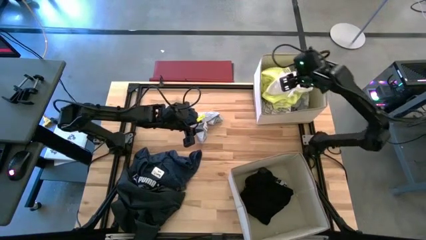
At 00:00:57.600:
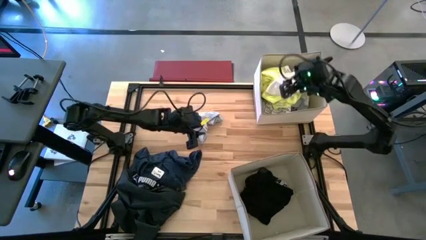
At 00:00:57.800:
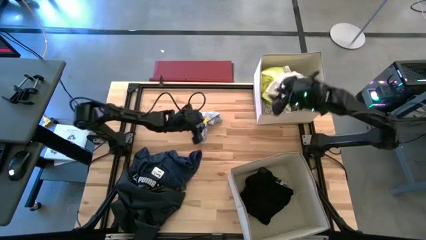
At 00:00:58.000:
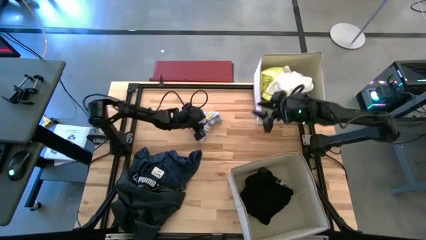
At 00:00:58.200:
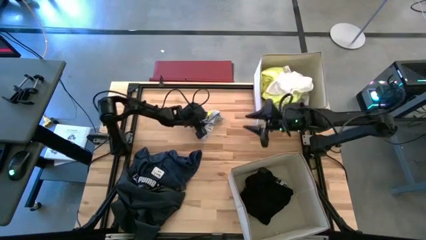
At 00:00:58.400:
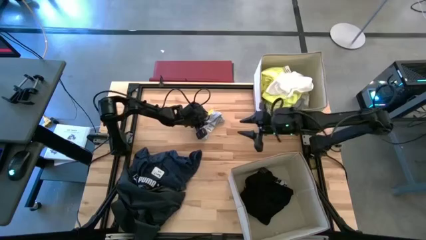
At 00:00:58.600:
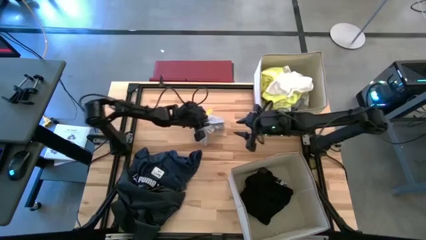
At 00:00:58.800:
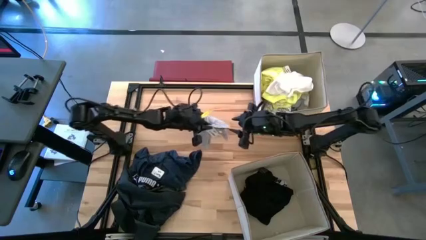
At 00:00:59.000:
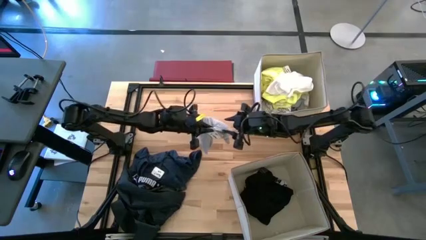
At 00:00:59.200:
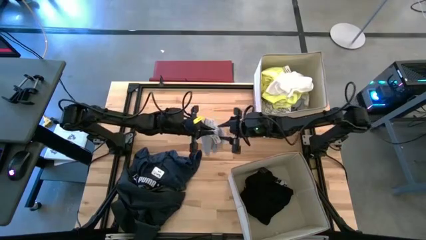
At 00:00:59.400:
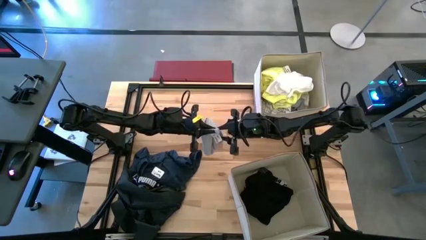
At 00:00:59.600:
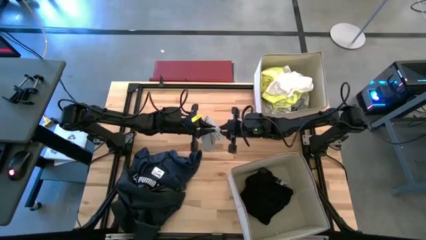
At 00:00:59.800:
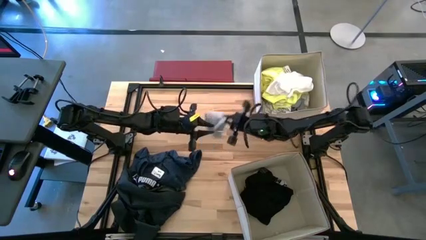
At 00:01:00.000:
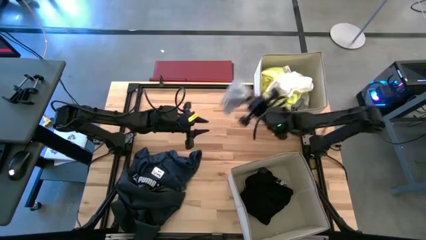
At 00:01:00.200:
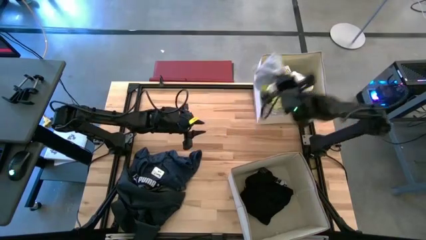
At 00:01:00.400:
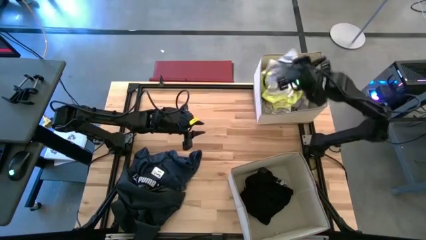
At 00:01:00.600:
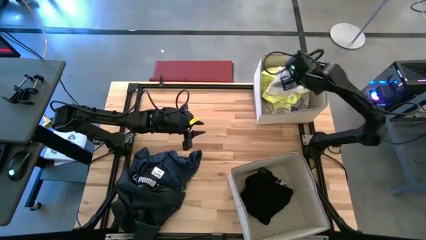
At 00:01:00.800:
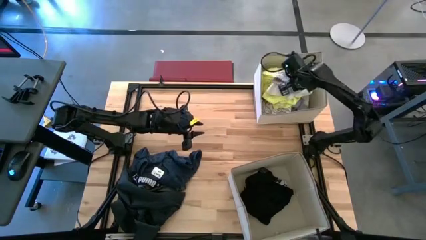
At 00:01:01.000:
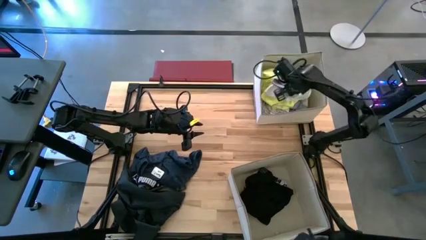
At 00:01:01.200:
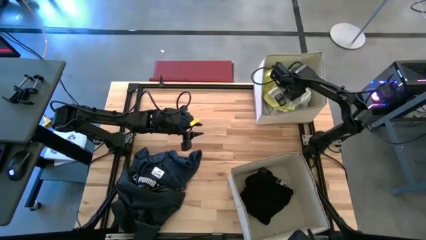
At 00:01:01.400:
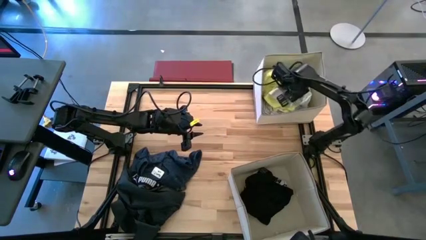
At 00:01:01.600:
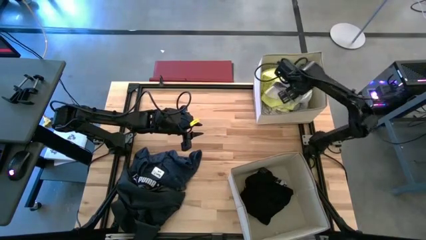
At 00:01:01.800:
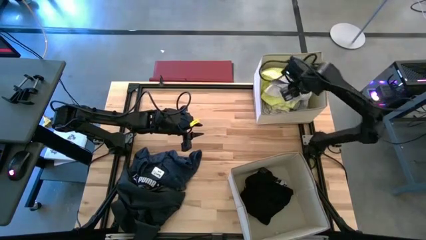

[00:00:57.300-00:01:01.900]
Task: Sort clothes
Put the gray shorts in the top white bin

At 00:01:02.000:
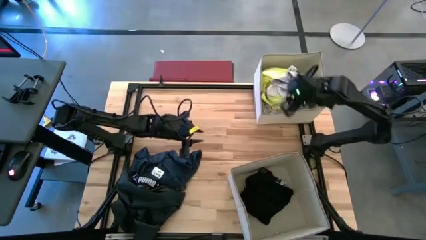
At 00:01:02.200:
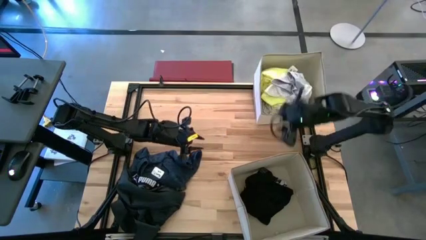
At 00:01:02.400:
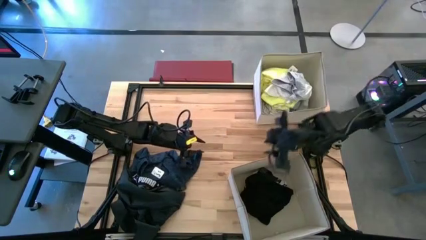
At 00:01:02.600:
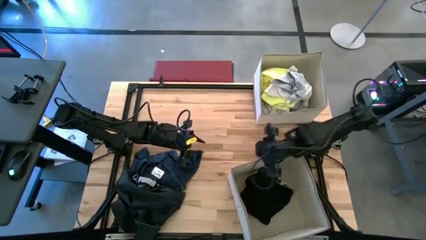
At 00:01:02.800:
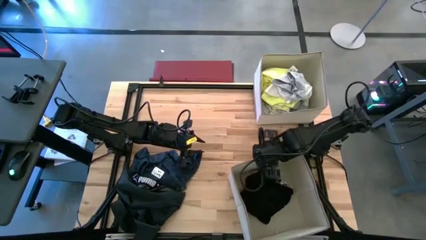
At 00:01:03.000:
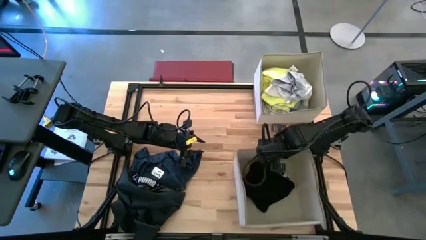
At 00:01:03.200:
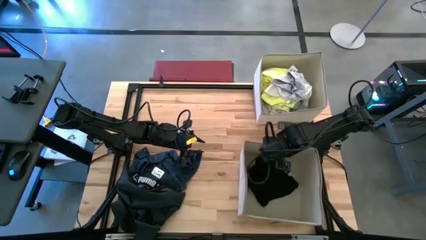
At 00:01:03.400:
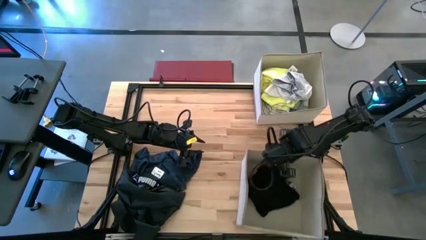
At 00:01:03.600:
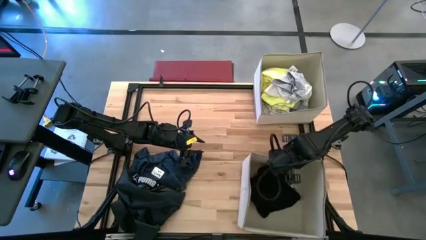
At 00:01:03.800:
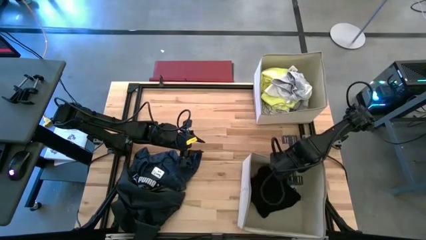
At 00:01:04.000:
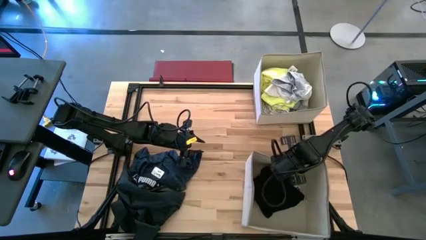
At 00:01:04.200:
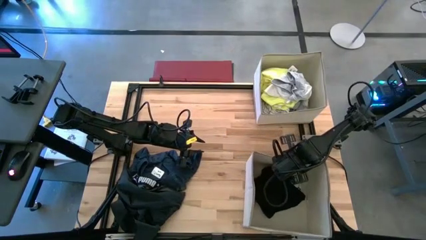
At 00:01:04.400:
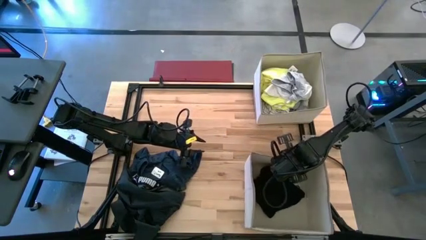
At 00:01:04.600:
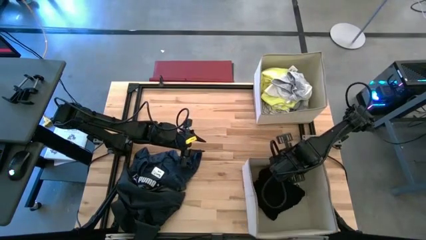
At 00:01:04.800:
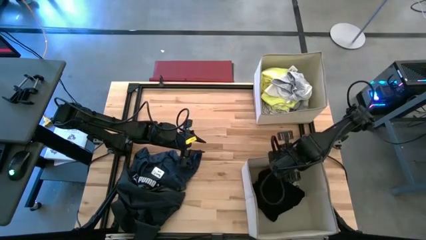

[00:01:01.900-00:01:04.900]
Adjust the bottom laundry bin

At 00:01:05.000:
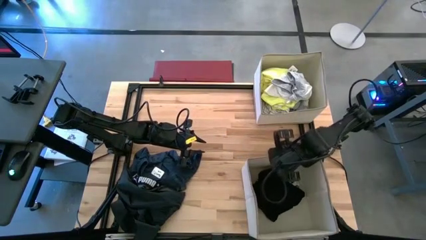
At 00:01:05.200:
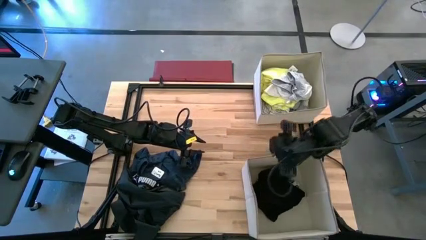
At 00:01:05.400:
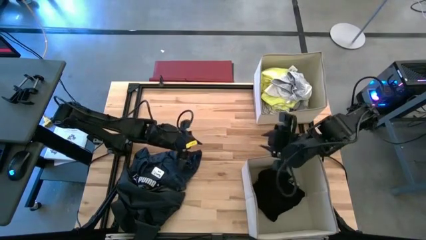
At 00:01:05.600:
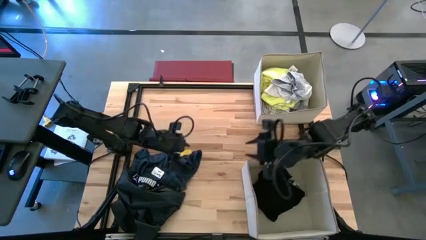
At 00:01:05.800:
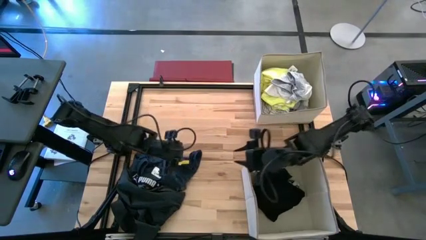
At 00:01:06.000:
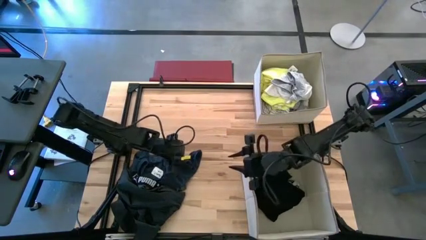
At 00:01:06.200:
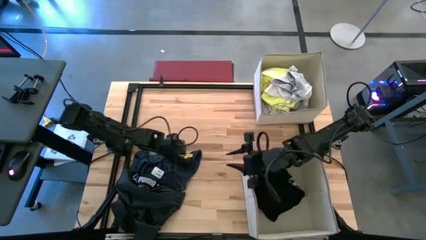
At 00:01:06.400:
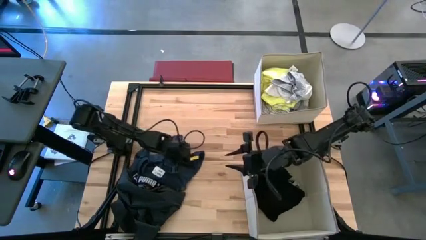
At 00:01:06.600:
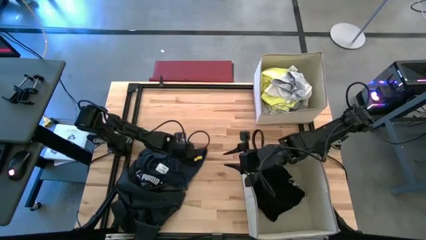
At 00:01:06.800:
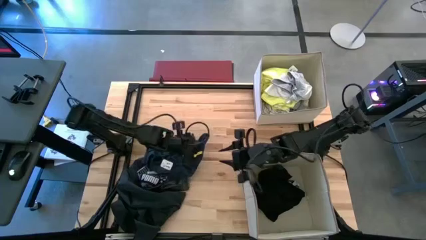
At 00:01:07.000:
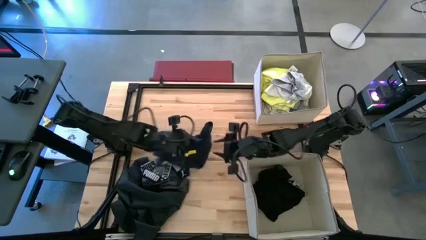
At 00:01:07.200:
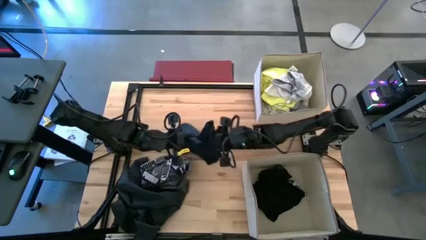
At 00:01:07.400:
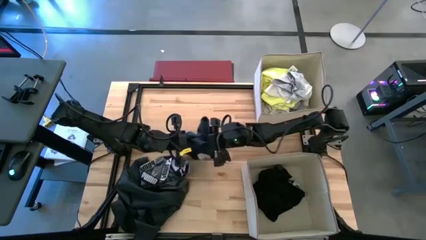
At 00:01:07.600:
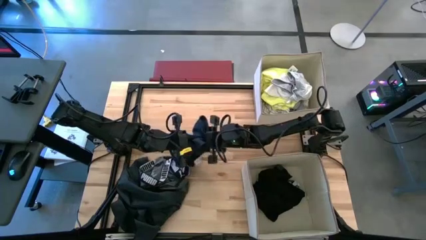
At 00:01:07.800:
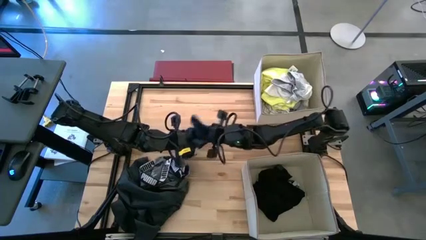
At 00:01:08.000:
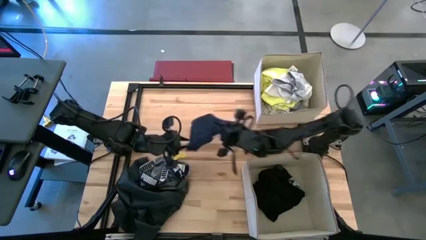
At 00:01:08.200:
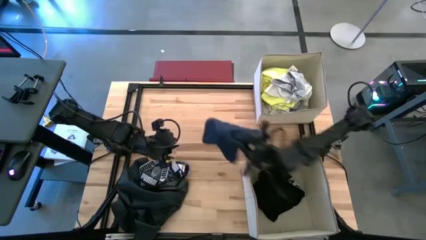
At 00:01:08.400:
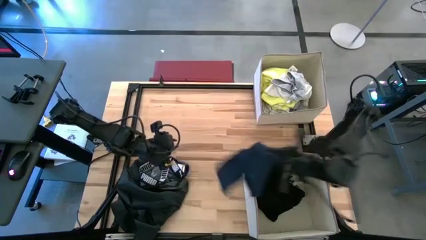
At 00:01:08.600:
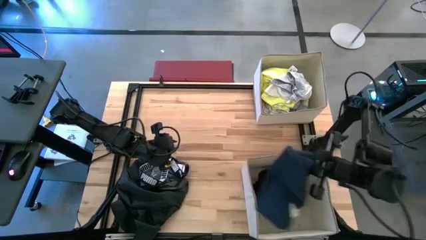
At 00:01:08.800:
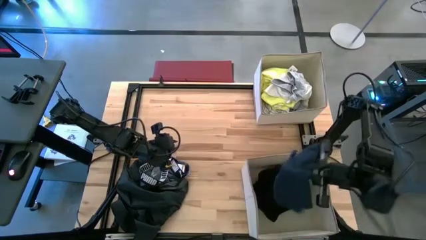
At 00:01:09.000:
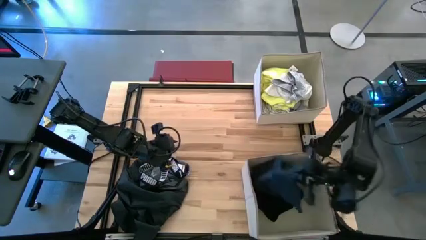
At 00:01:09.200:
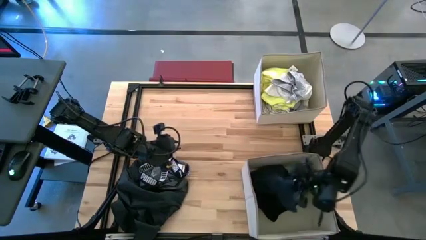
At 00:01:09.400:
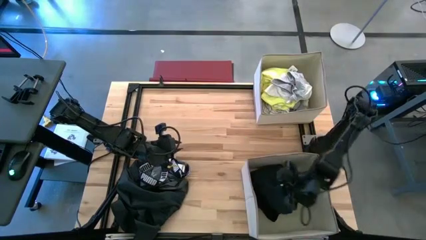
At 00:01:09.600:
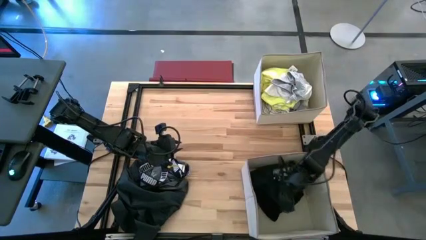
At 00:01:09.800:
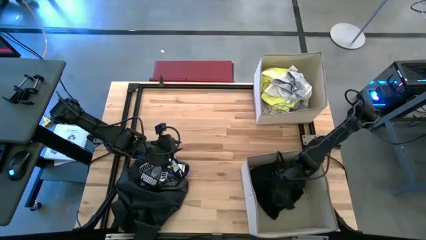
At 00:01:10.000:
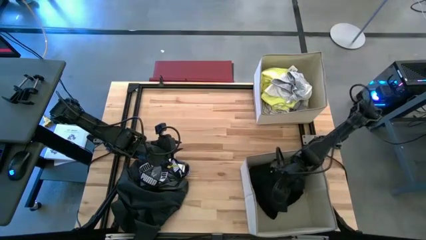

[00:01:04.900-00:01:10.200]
Put the black shirt in the bottom white bin

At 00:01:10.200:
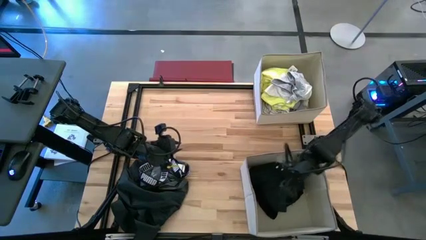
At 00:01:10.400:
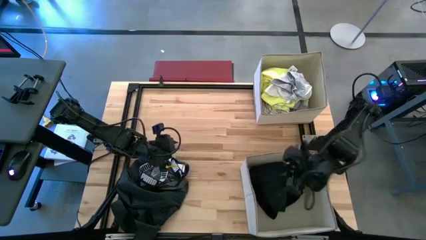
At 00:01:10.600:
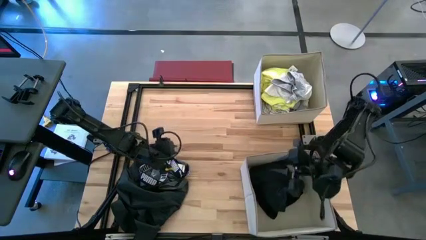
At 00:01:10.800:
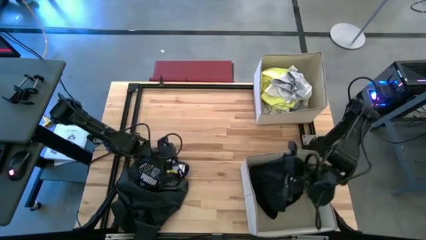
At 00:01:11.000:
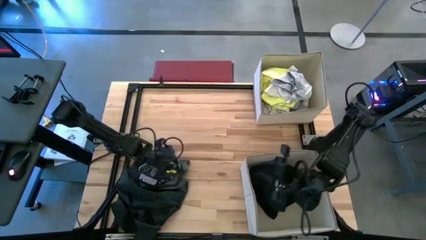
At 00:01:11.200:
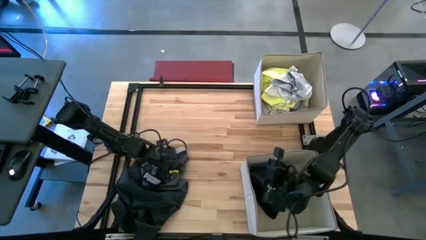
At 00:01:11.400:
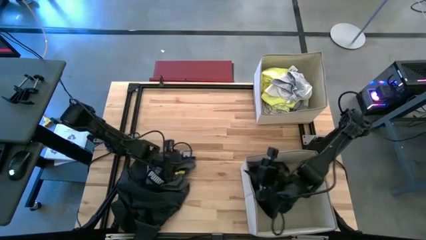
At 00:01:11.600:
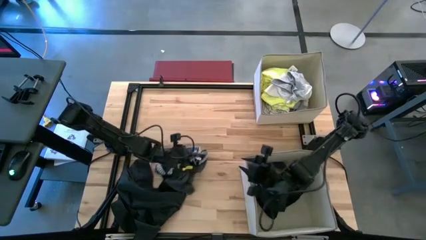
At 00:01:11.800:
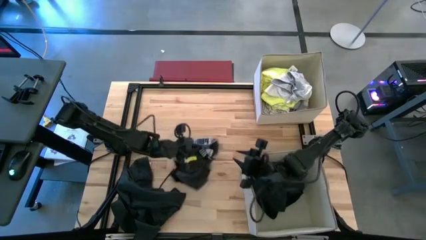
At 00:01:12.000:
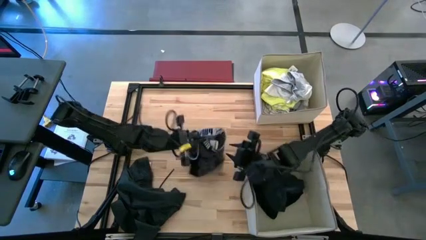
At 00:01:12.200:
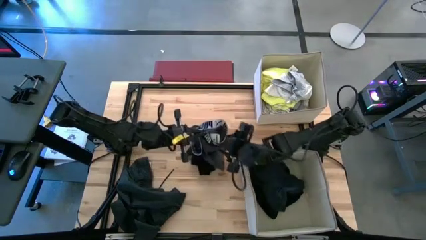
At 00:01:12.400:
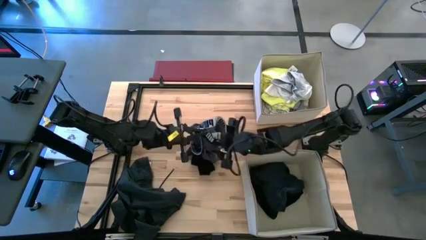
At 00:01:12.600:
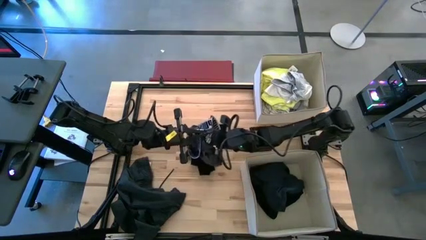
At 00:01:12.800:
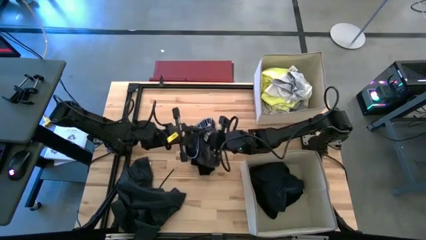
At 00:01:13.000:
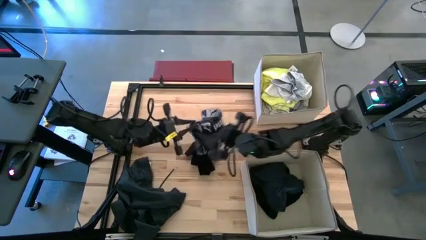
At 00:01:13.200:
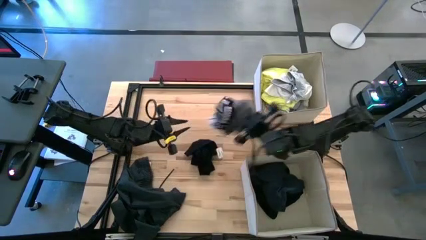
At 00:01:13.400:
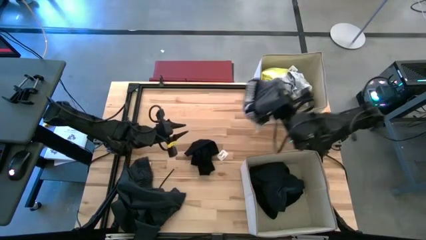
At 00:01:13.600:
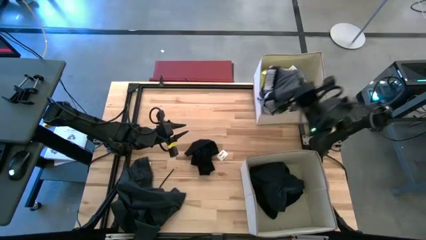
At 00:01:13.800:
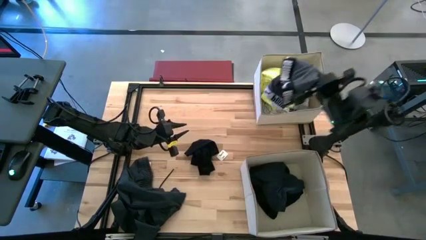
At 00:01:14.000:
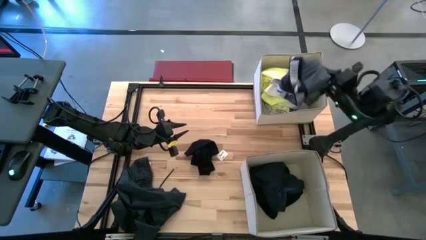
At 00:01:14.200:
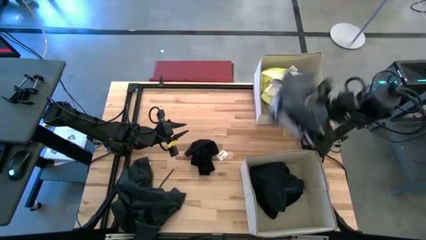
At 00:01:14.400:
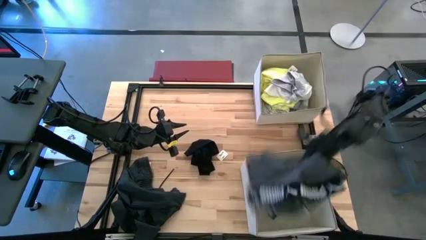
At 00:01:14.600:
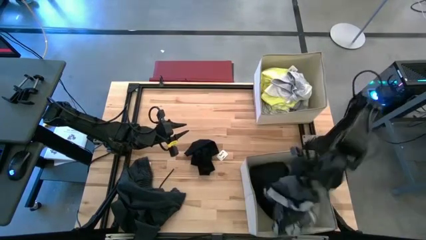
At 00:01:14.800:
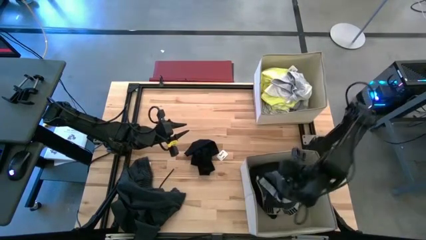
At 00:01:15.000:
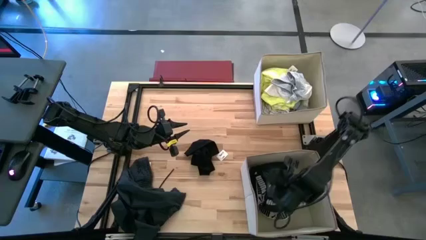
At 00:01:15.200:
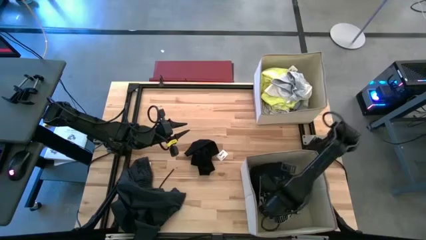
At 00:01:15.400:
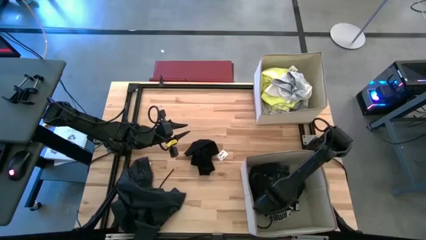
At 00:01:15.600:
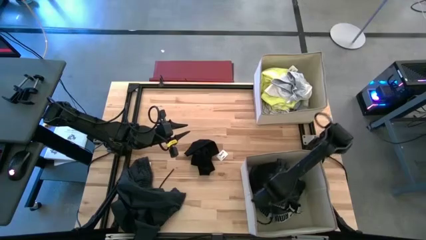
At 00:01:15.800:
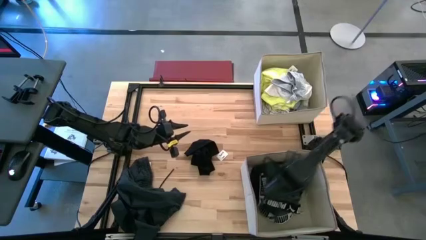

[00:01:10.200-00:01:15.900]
Put the gray underwear in the bottom white bin
